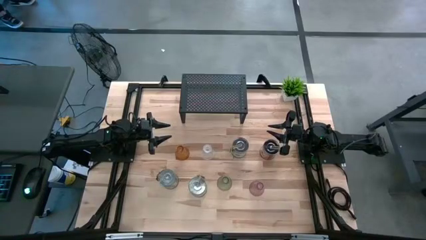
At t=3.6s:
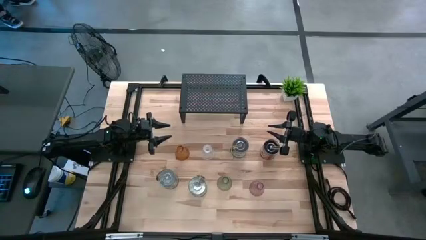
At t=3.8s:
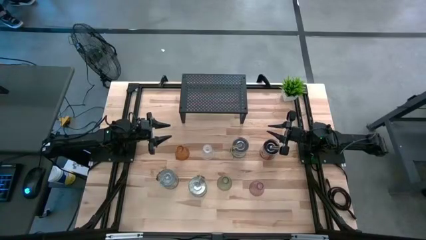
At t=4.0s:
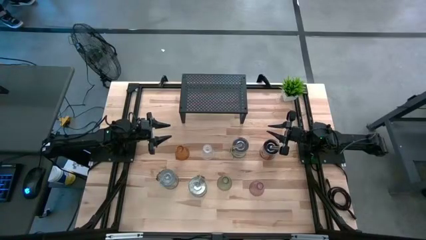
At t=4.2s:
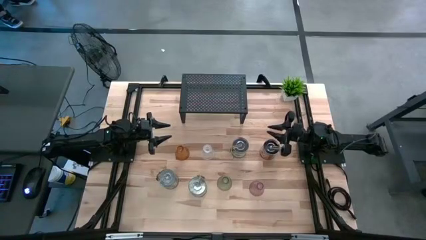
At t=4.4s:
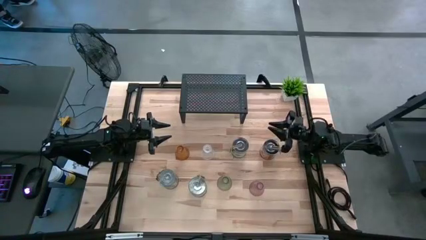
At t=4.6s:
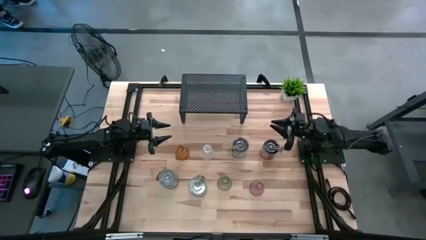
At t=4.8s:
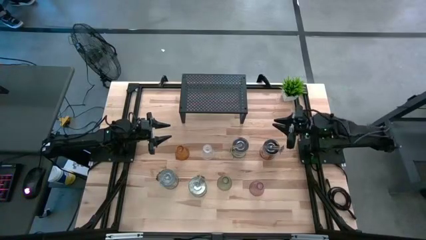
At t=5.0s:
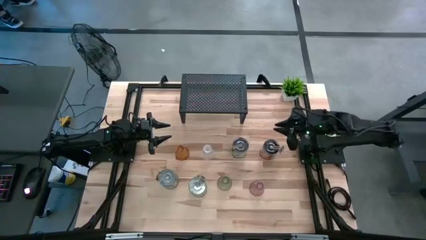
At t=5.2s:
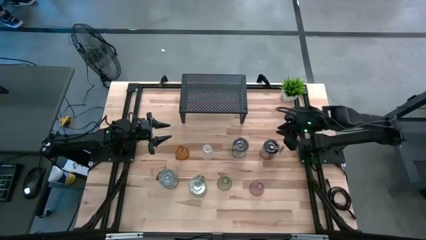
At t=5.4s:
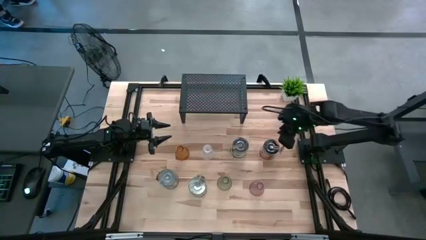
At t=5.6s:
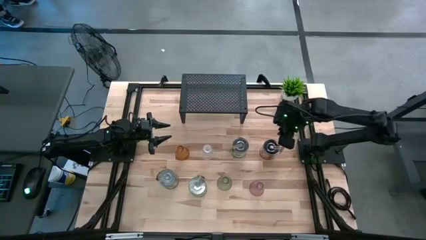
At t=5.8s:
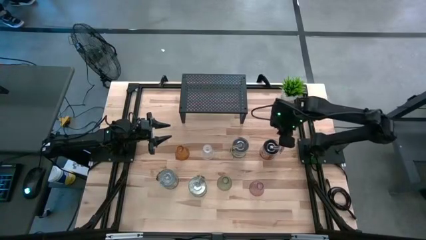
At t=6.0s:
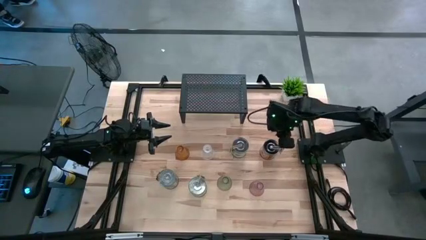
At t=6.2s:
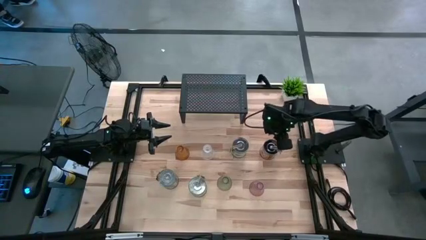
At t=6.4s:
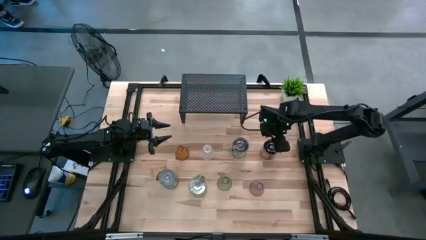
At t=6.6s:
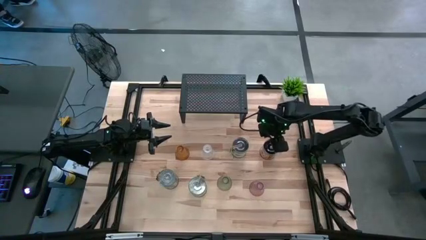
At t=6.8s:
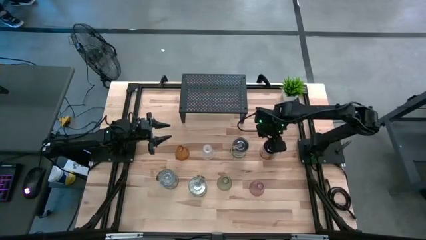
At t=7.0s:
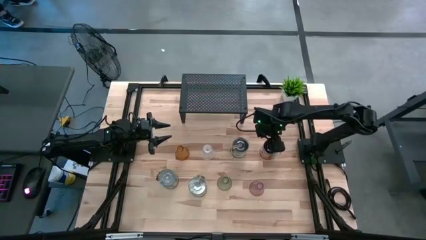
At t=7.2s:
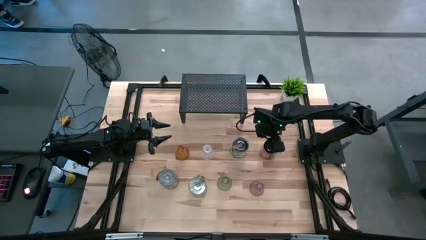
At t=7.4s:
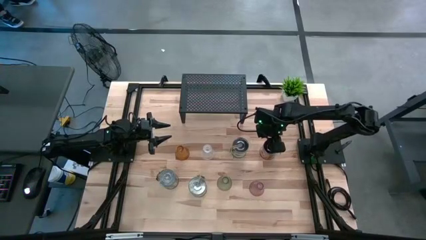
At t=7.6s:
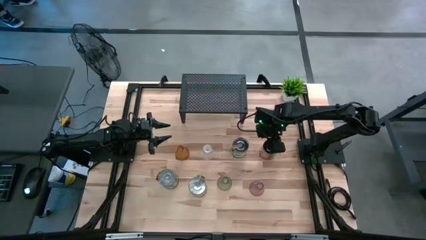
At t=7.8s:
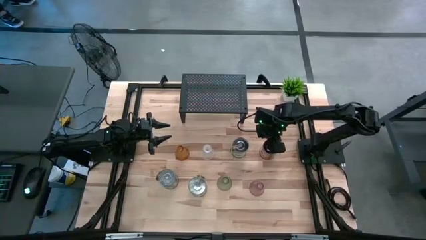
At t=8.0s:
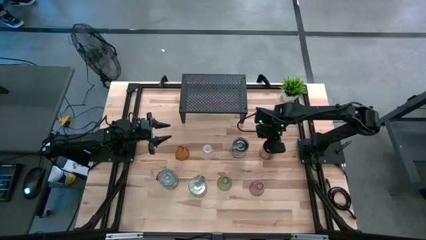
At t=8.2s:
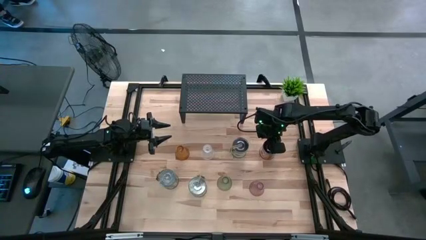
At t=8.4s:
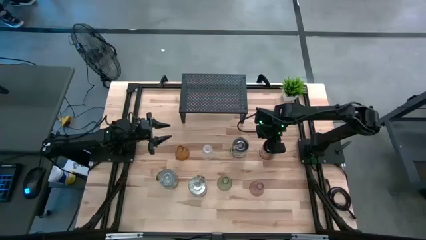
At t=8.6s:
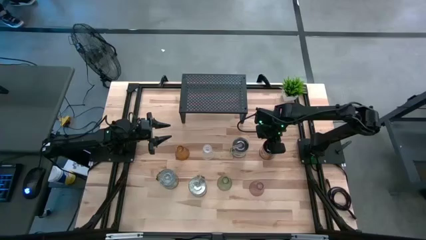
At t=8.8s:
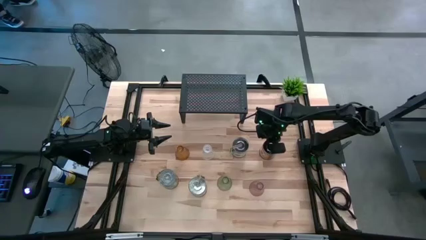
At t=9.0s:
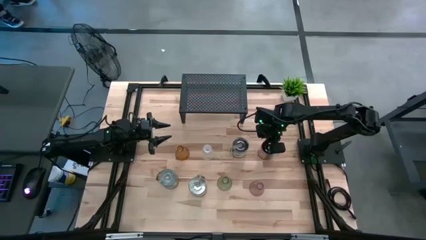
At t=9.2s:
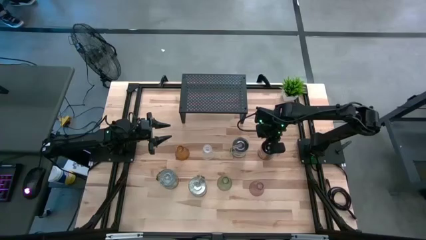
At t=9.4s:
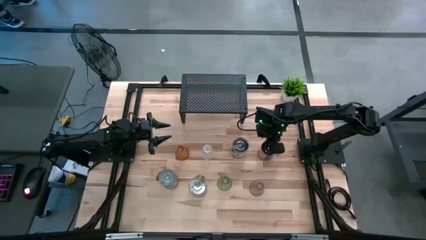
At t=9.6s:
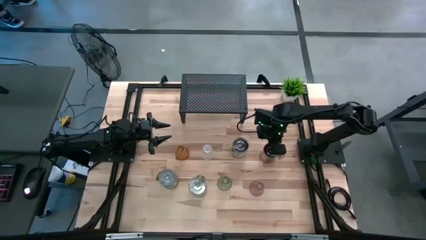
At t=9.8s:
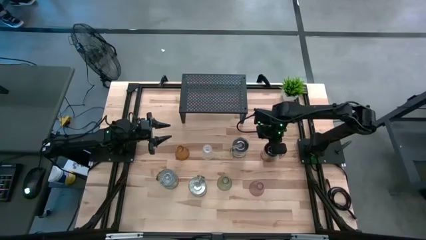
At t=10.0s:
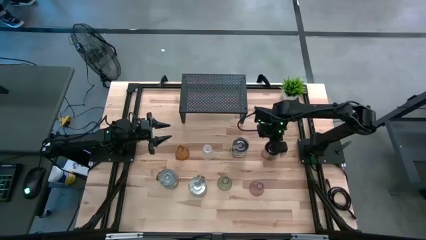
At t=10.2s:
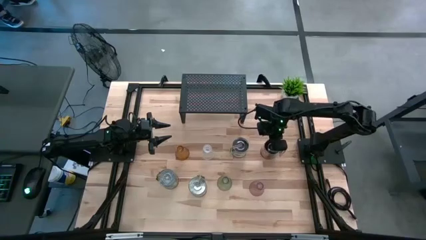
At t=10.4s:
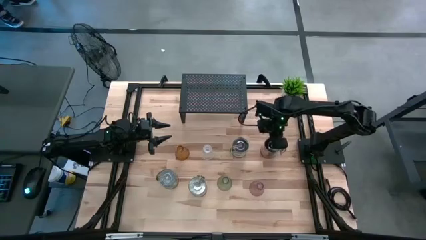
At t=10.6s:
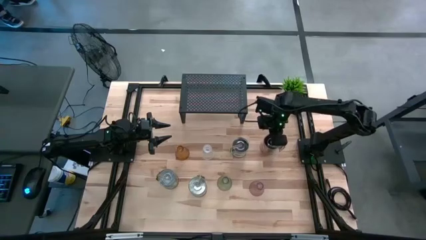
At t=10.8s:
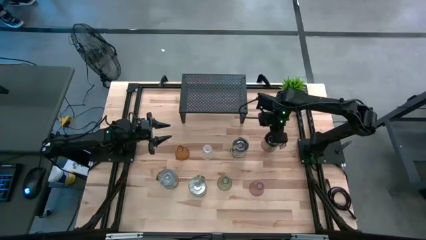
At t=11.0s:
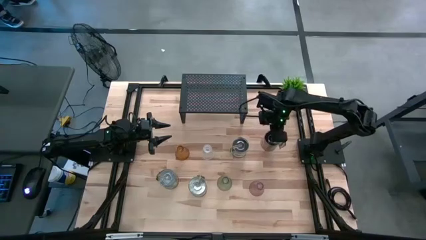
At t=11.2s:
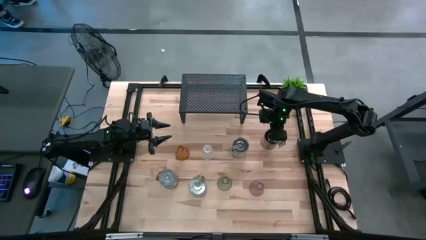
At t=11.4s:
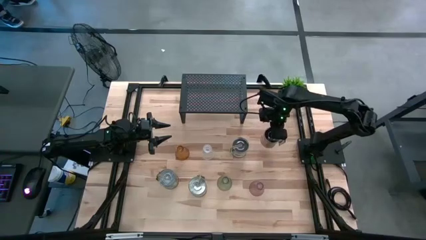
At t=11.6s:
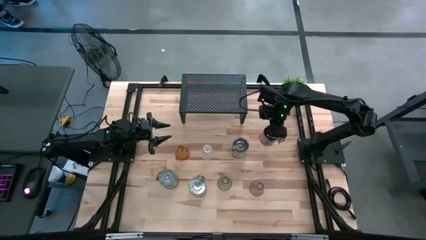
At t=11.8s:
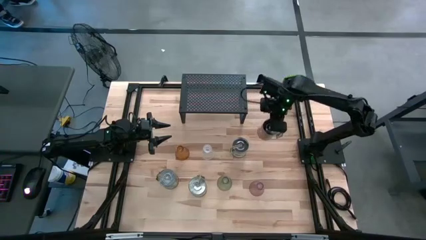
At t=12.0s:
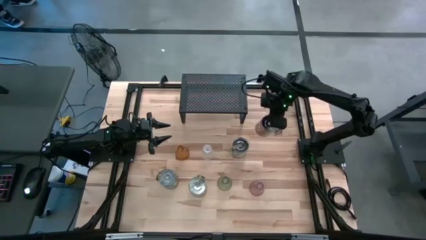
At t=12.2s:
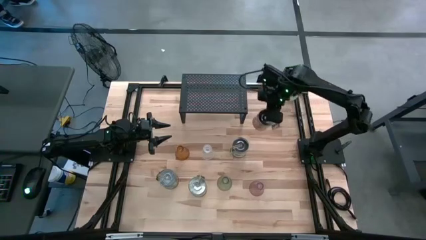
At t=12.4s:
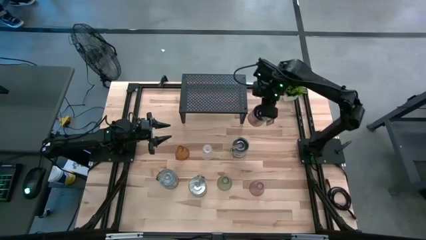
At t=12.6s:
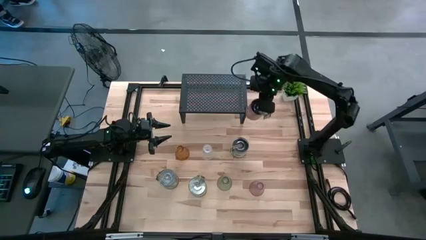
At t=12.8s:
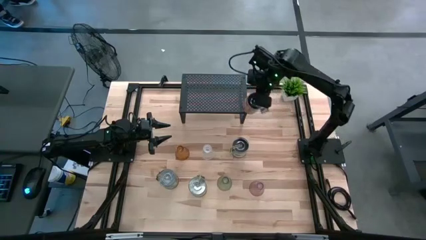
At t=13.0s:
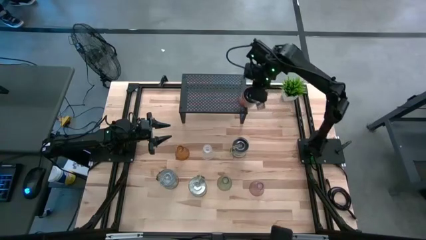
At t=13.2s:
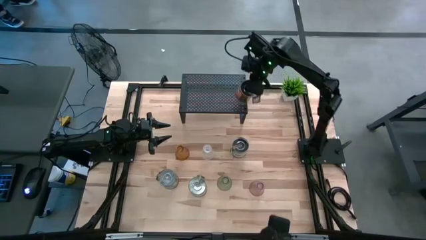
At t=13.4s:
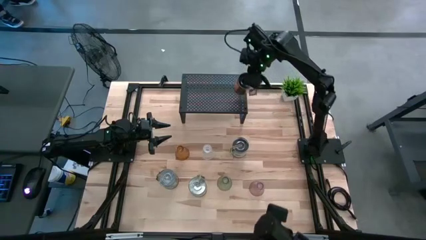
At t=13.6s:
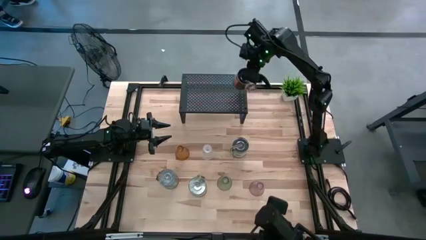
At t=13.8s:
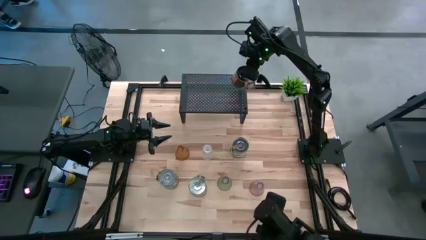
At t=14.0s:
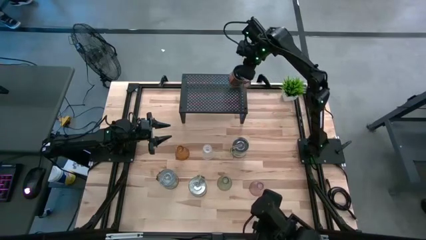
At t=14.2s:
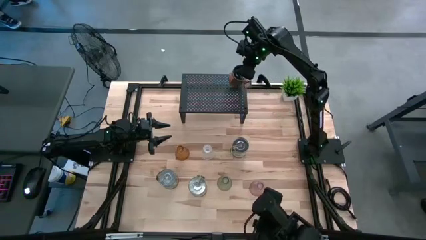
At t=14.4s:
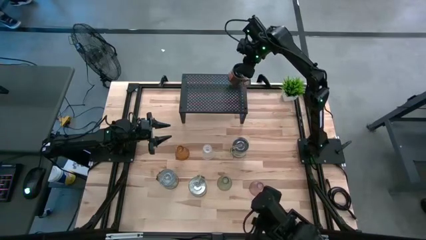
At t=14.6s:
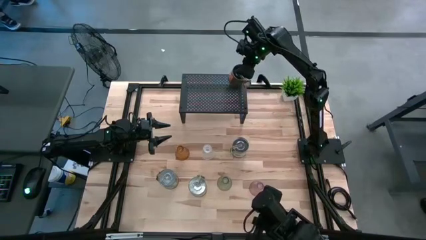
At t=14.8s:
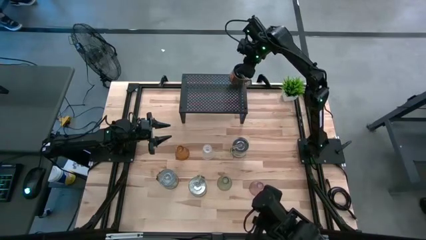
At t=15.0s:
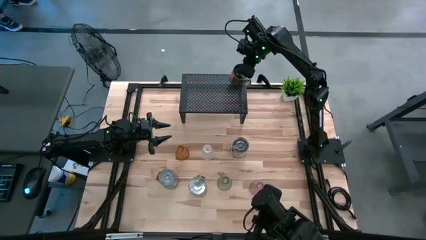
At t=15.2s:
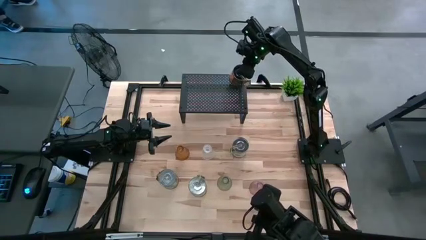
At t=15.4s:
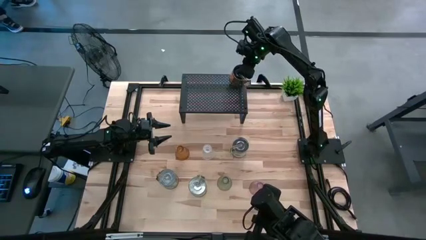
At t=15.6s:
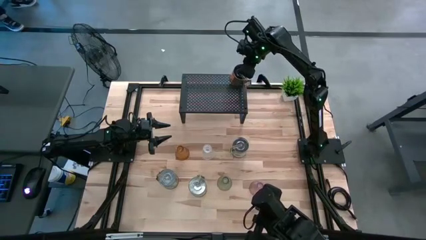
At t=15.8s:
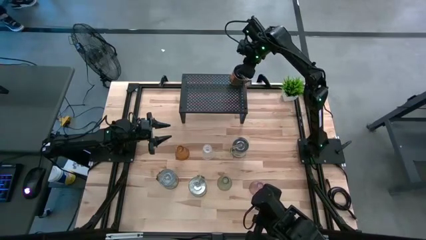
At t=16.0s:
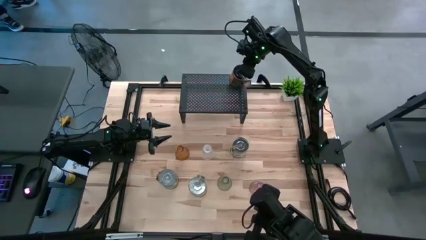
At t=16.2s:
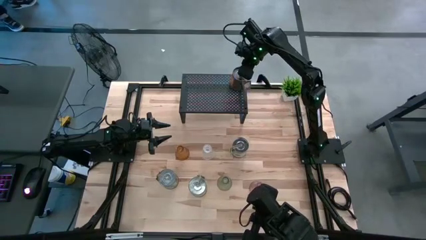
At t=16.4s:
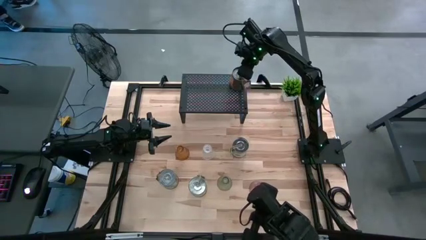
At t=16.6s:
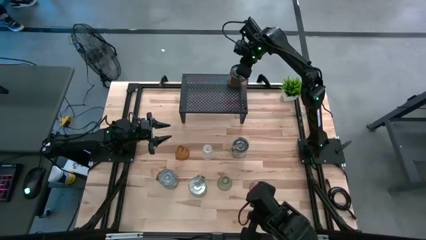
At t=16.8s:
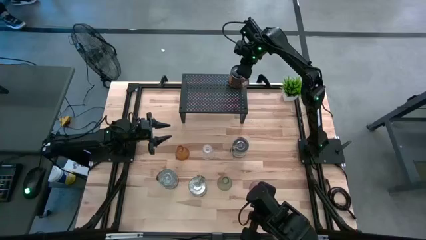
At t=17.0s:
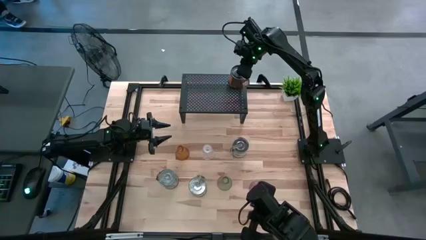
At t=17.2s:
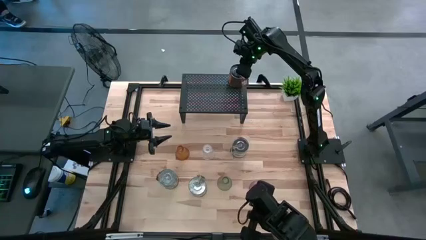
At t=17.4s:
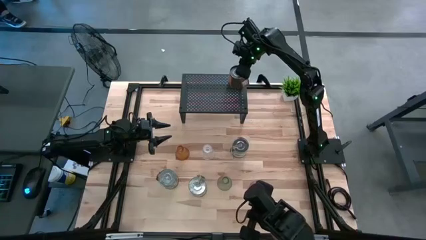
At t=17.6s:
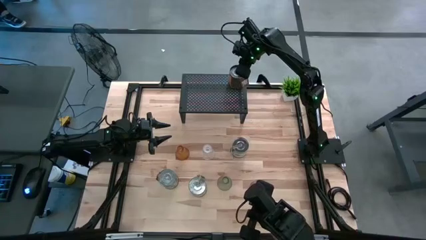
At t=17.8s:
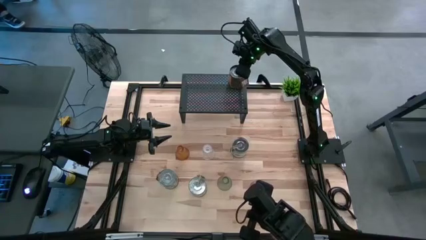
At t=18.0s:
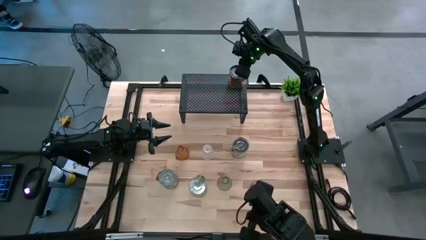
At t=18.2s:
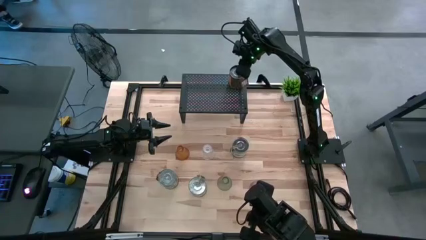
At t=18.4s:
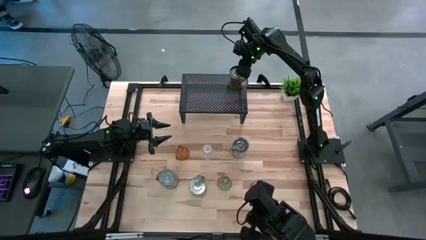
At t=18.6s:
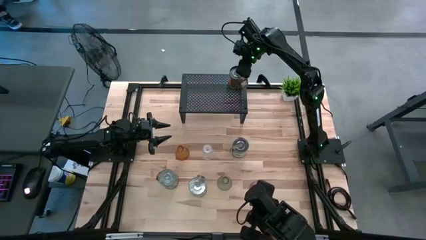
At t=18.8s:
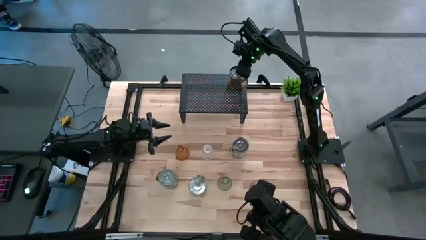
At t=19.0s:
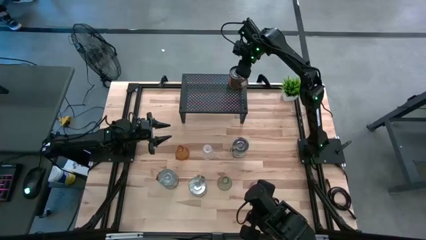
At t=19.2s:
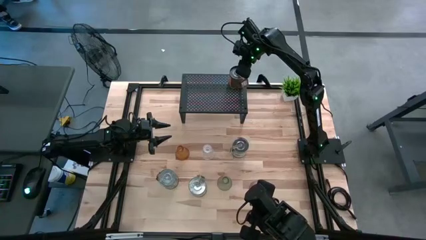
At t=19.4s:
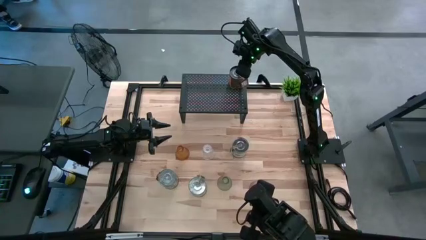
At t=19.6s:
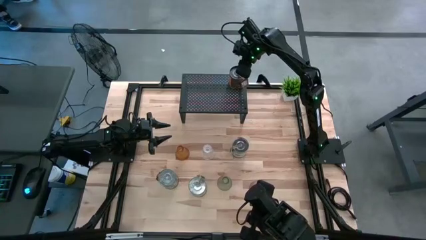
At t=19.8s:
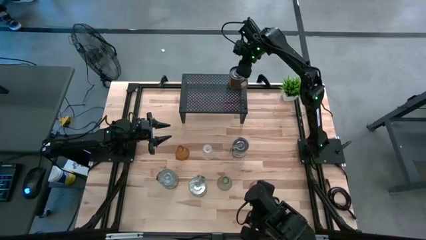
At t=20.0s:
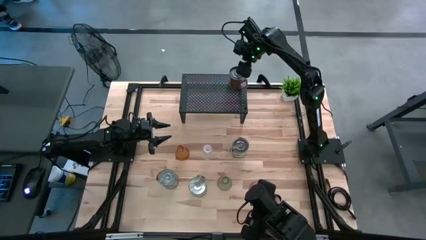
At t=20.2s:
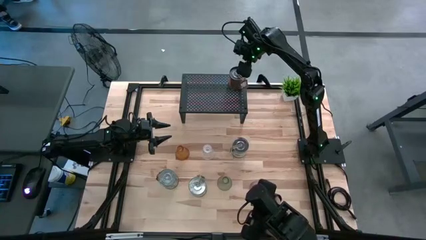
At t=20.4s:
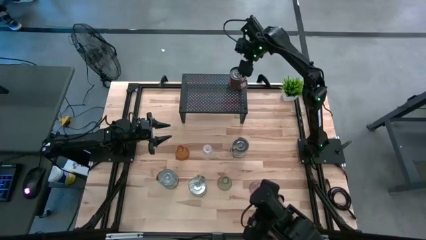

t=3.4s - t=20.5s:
Task: Pick & Place candle stick holders
Put the orange scented candle on the shelf
